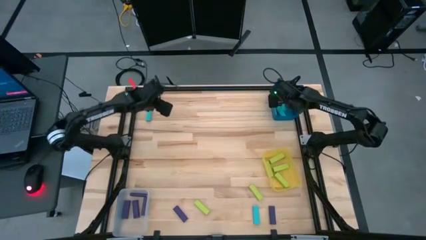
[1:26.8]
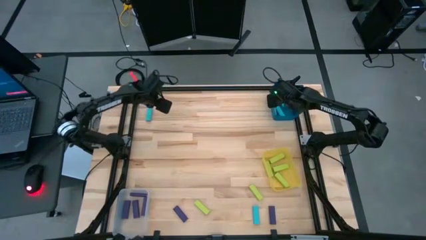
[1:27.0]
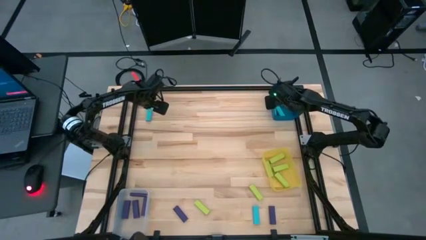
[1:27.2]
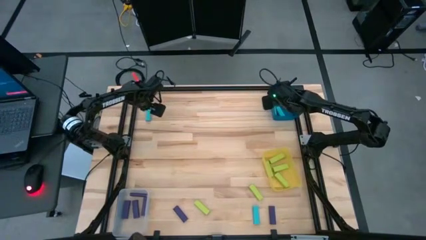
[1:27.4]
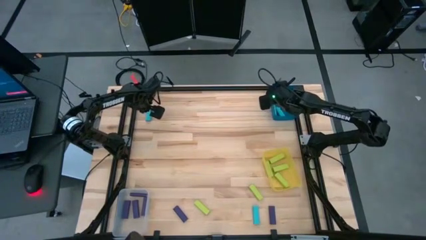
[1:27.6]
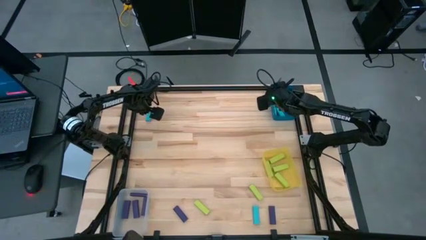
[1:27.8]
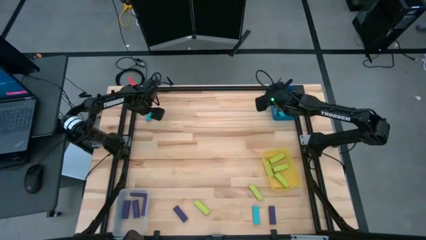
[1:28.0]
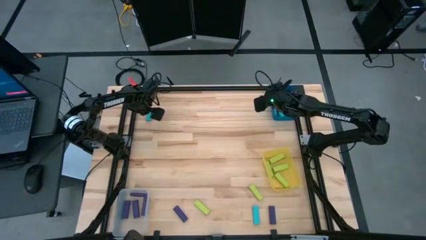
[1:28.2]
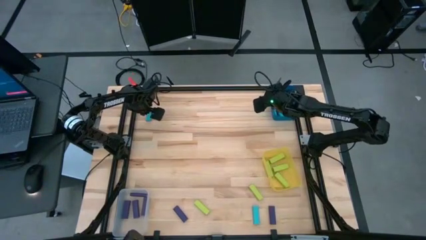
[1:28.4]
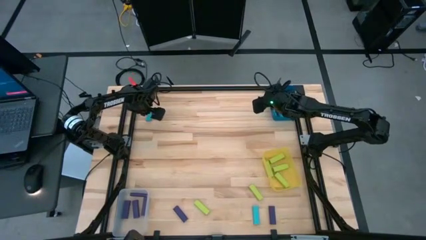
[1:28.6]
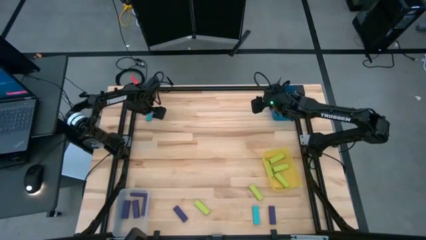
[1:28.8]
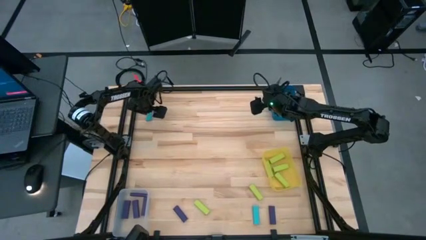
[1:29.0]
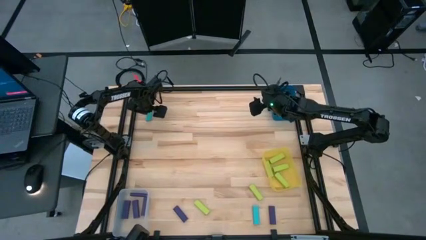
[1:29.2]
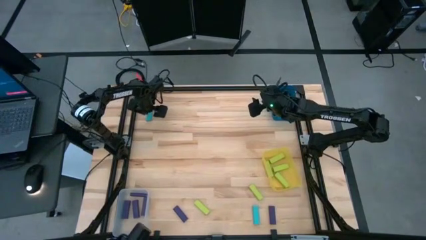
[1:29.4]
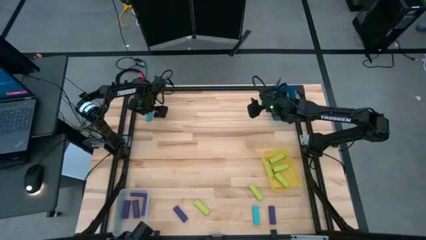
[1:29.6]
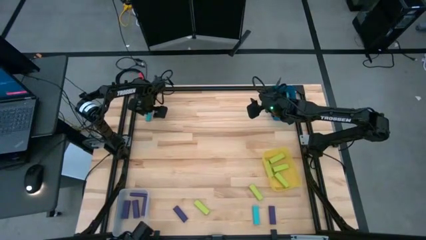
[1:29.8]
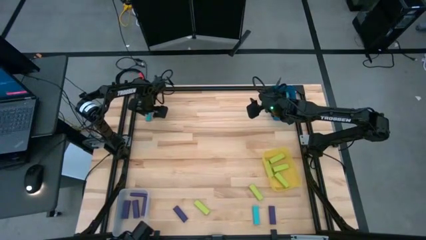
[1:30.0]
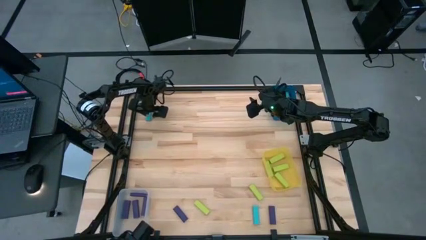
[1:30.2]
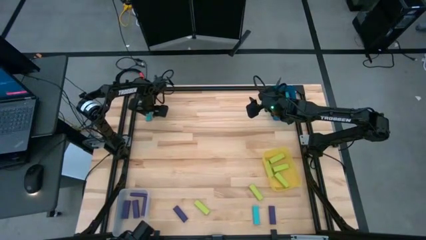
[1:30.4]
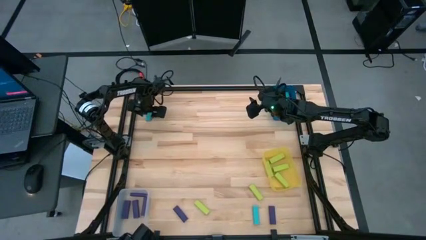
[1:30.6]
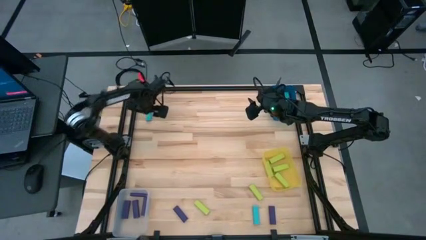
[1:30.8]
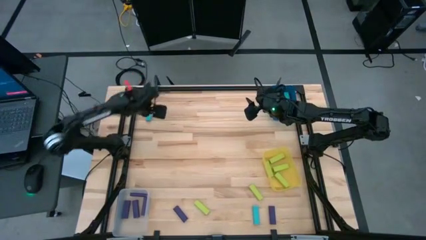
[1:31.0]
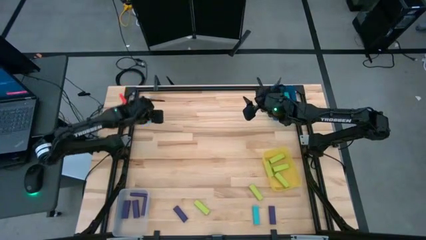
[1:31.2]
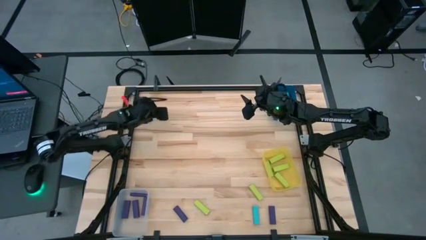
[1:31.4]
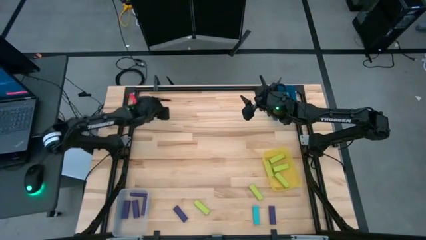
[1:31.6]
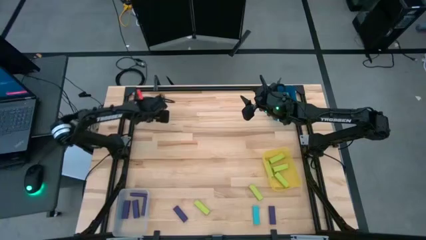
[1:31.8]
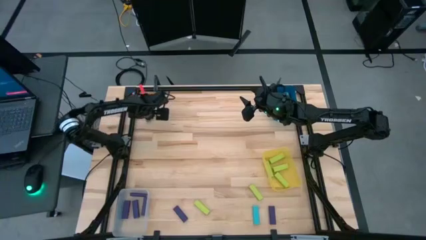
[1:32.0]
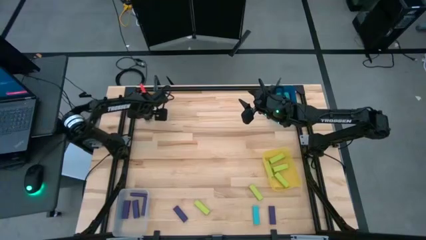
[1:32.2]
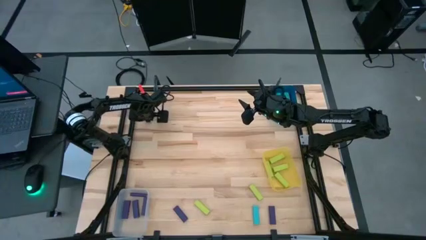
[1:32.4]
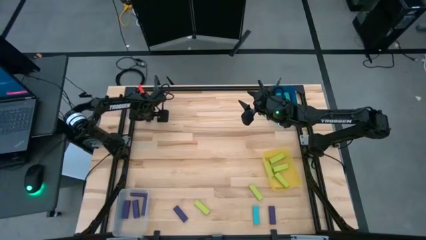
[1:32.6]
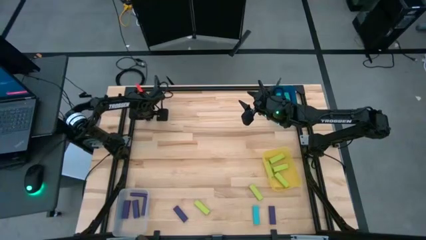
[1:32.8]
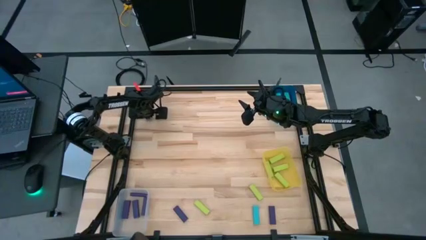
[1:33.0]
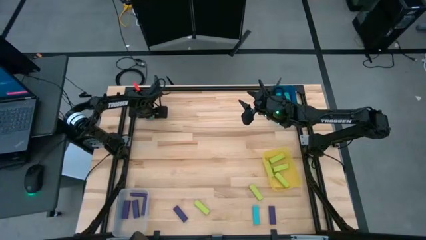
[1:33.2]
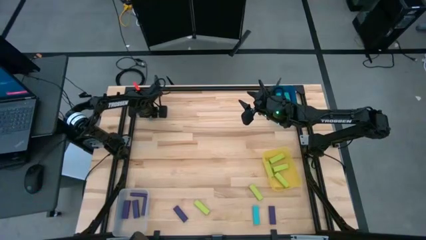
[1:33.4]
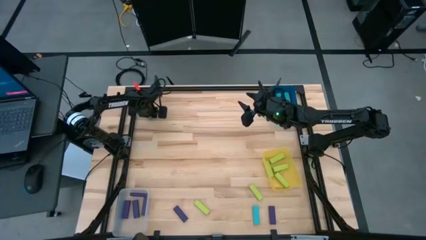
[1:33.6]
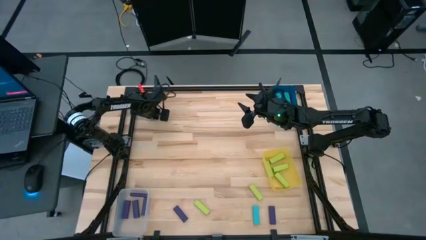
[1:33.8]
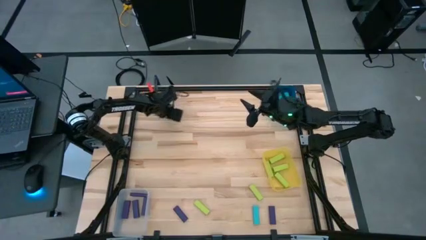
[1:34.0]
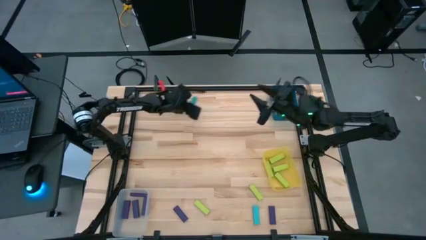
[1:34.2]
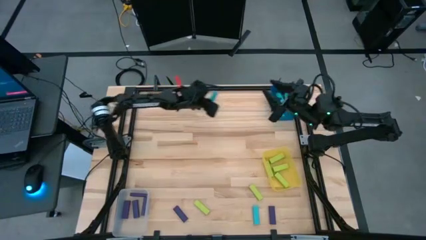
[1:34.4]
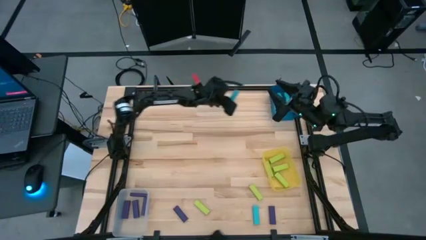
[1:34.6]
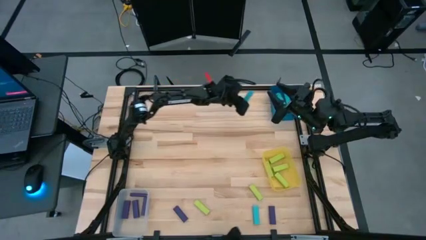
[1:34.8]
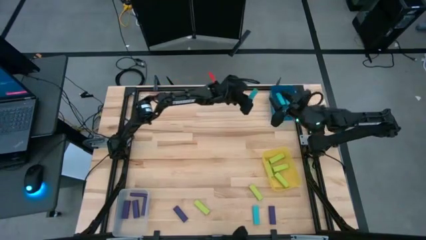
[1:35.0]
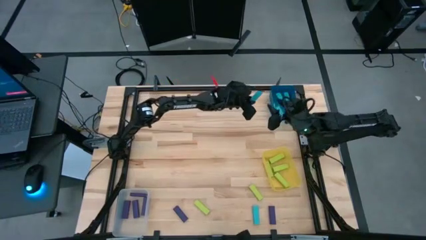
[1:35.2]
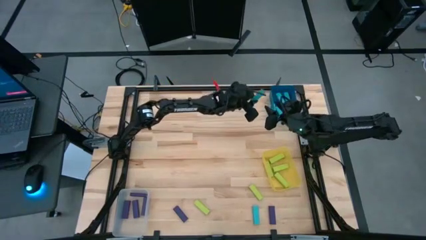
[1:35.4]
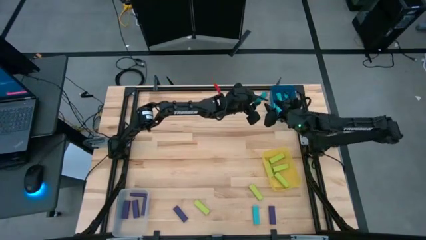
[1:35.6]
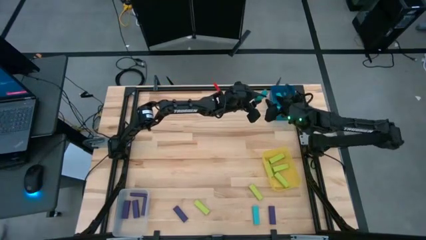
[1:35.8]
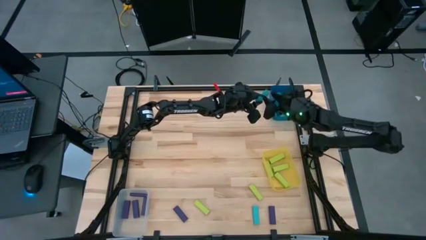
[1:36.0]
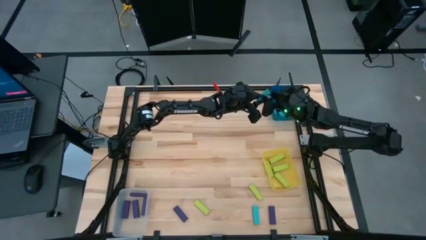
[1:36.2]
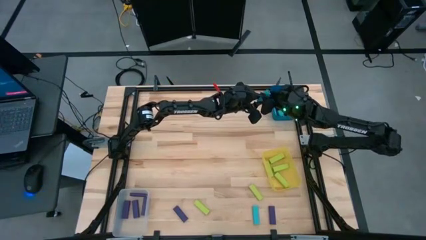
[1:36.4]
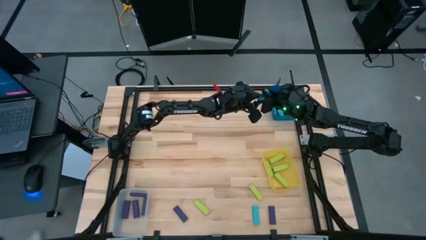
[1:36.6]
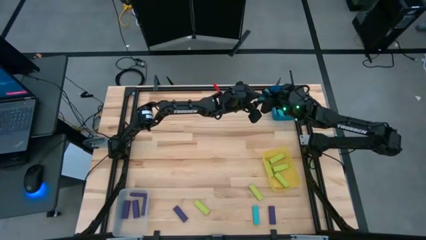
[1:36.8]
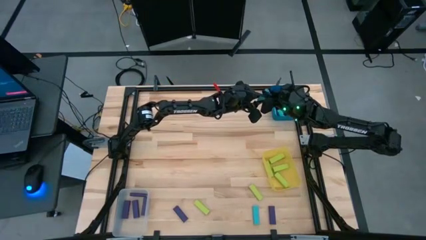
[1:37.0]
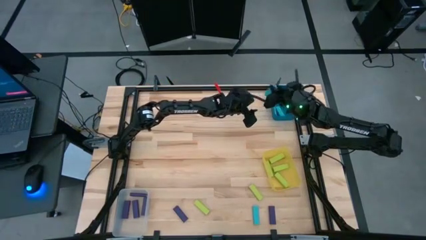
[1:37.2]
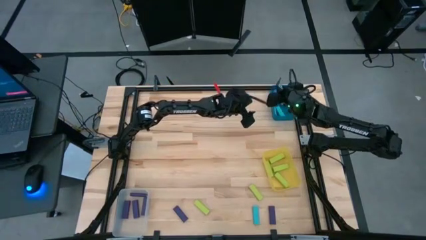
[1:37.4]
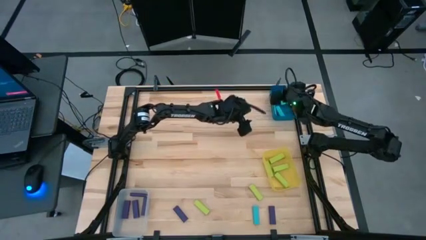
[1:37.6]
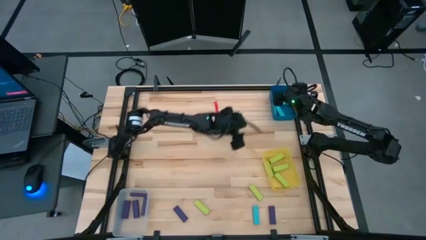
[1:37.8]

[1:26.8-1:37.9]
Task: Sort blocks
Put the blue block into the blue bin

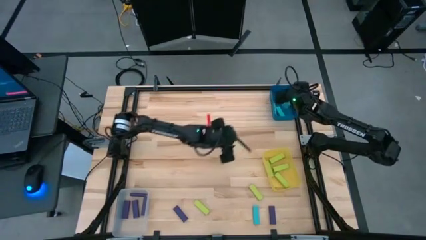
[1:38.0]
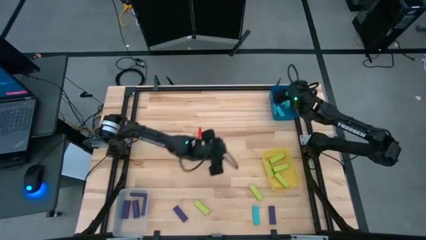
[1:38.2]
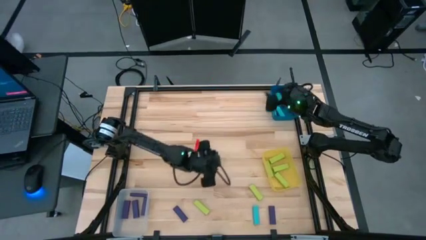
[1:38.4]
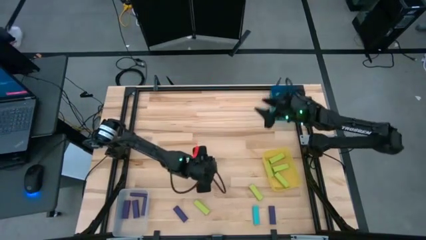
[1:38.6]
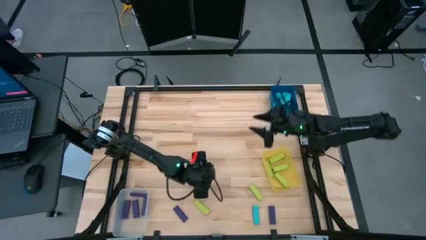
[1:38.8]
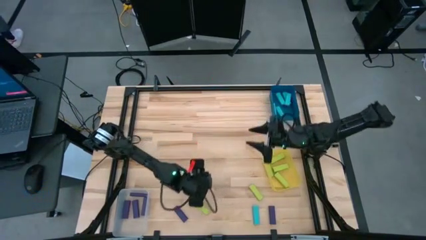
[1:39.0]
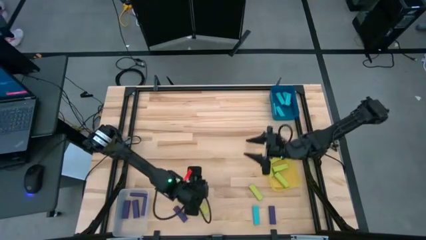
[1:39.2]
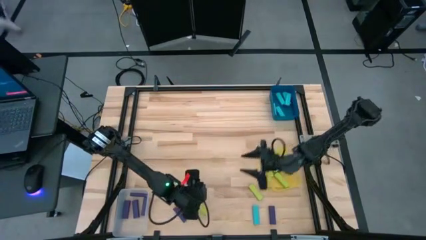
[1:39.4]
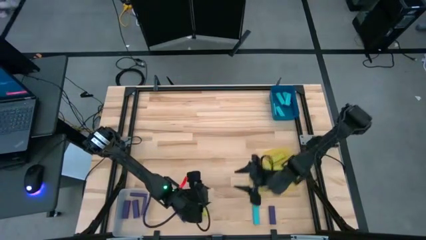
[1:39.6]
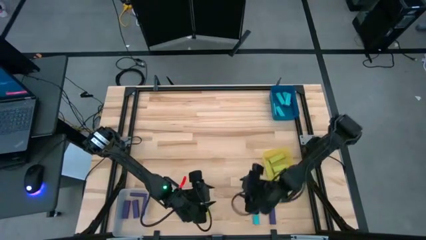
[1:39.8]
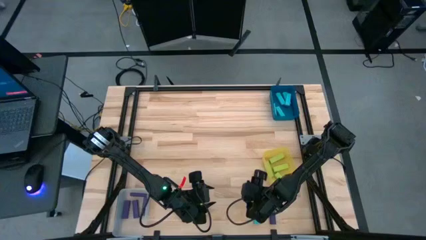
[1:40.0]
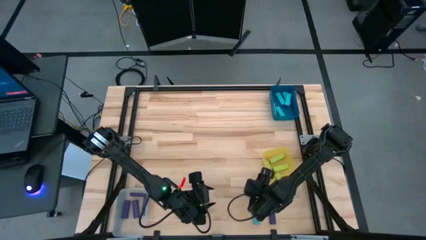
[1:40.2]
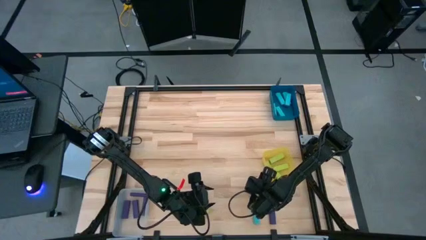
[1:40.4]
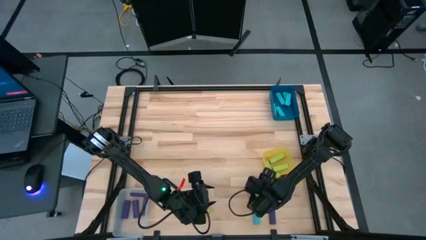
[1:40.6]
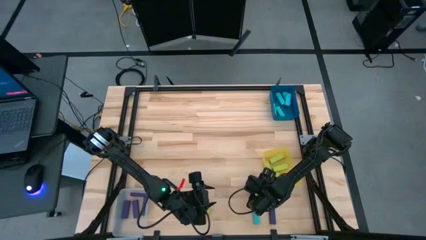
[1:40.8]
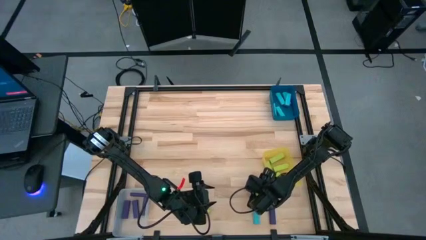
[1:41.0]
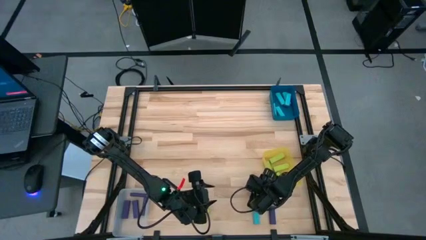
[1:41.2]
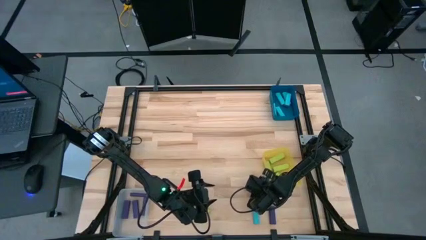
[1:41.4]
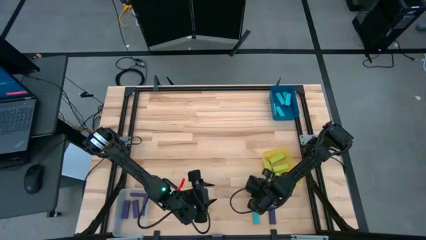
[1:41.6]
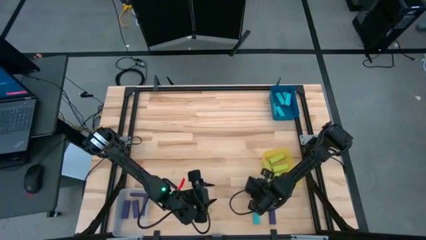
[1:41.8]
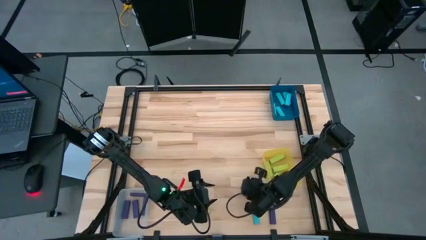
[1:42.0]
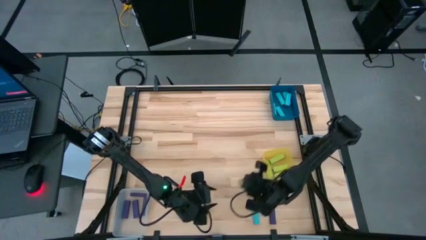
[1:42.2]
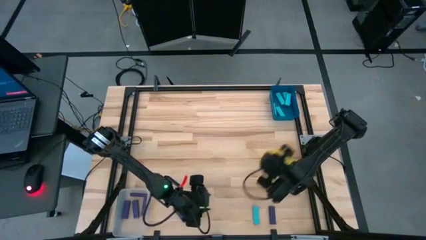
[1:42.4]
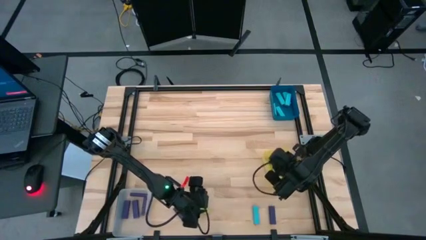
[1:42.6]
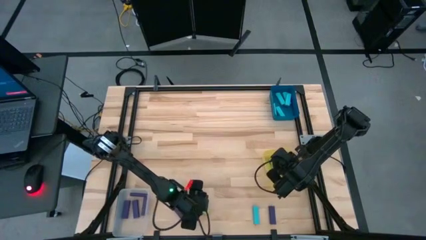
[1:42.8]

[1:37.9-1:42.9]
Put the green block into the yellow bin

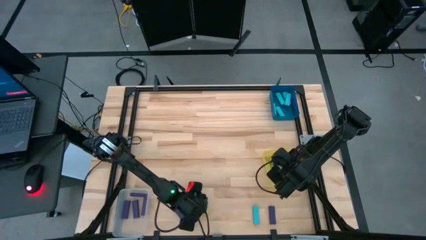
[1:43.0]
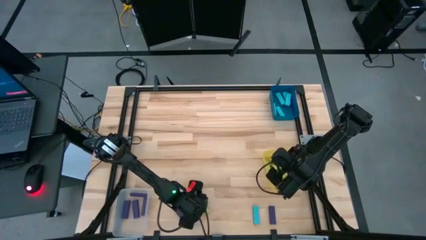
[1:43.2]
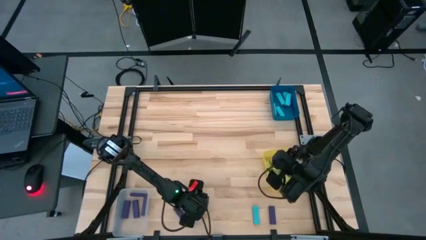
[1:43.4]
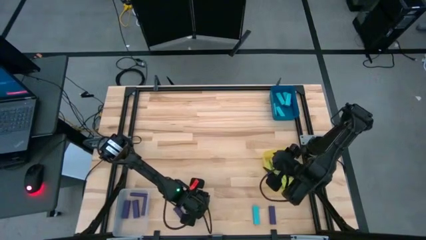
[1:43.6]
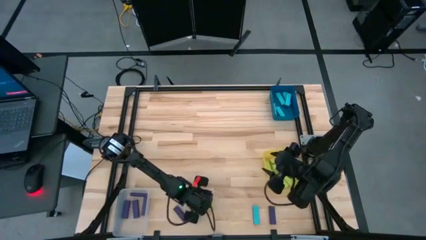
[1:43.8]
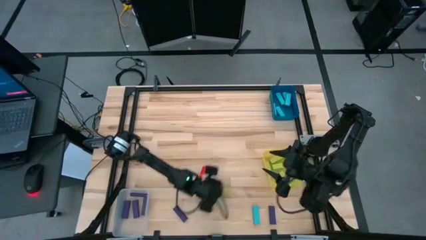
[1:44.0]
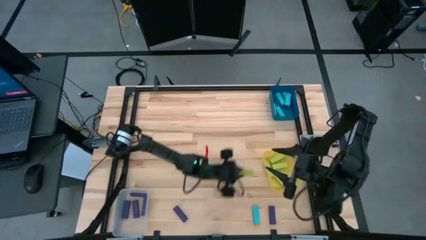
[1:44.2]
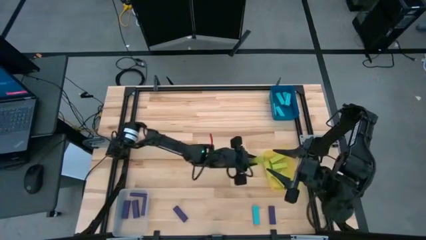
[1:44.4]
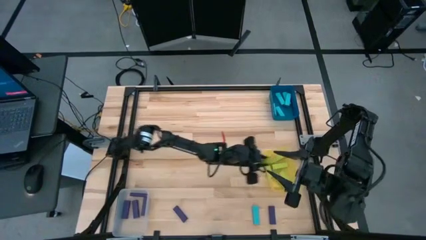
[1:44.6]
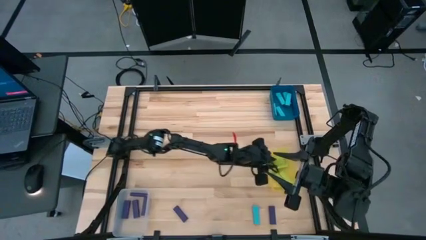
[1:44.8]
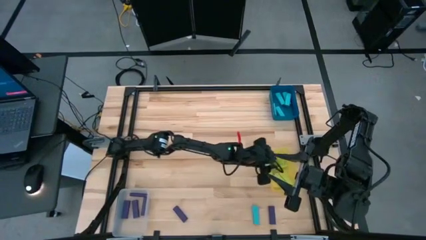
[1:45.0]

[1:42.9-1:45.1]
Put the green block into the yellow bin
